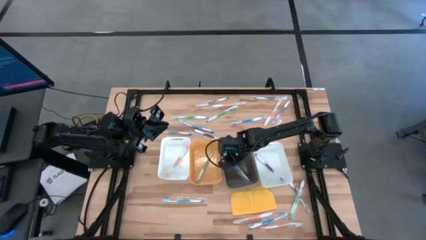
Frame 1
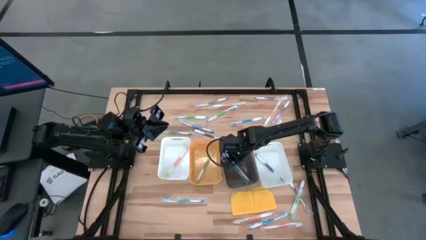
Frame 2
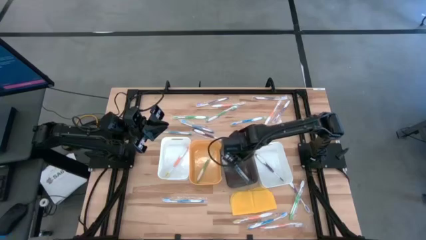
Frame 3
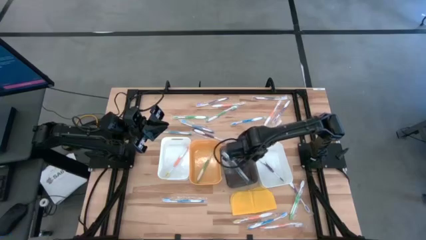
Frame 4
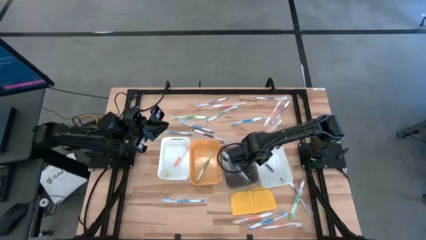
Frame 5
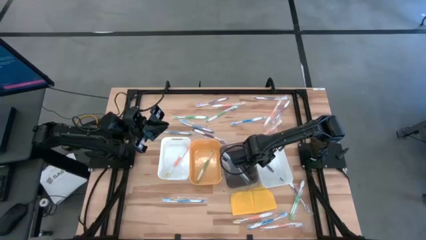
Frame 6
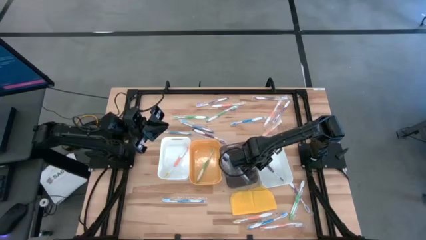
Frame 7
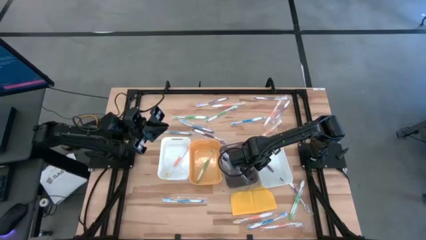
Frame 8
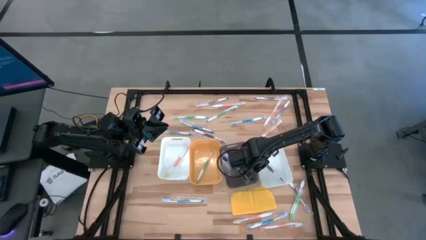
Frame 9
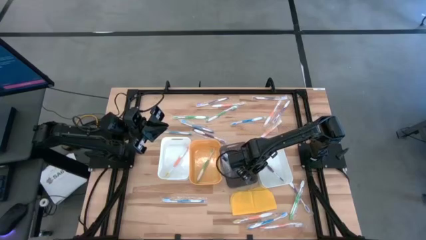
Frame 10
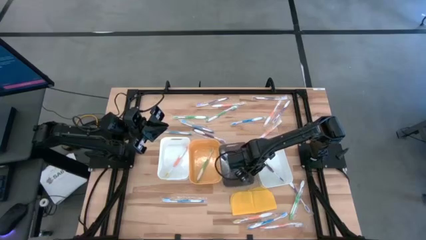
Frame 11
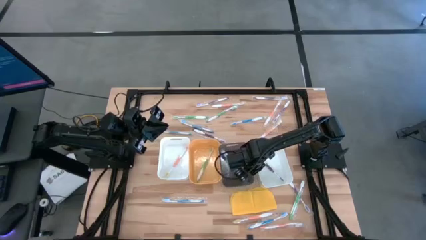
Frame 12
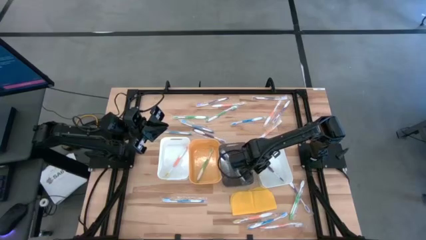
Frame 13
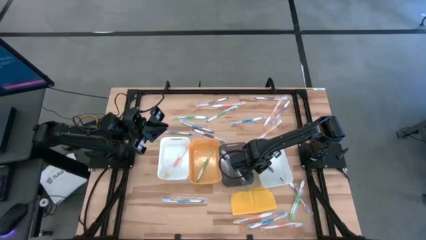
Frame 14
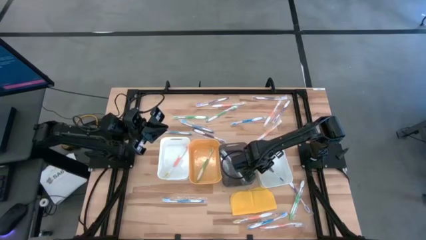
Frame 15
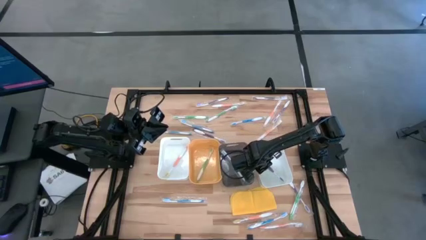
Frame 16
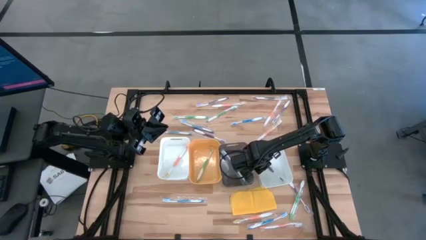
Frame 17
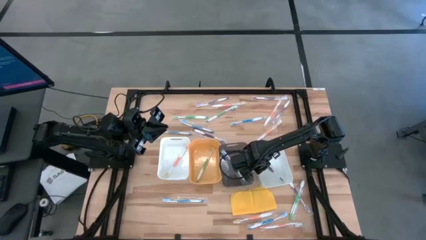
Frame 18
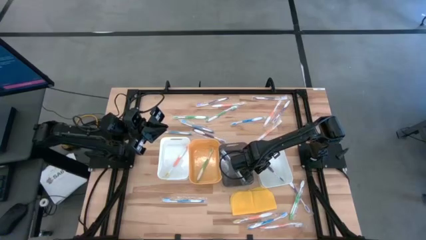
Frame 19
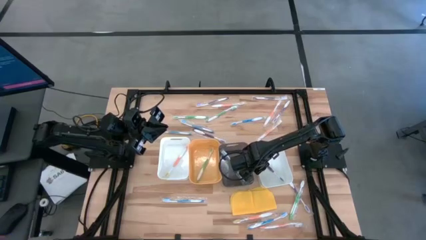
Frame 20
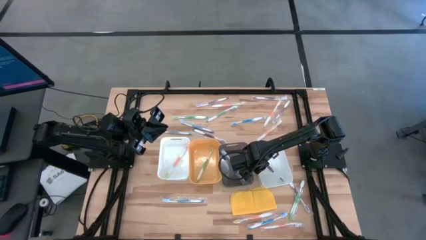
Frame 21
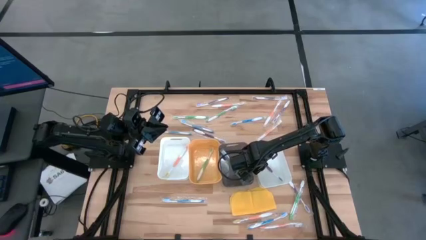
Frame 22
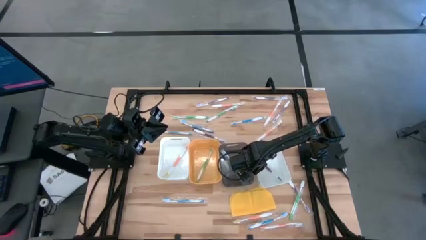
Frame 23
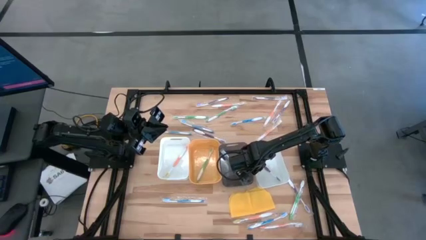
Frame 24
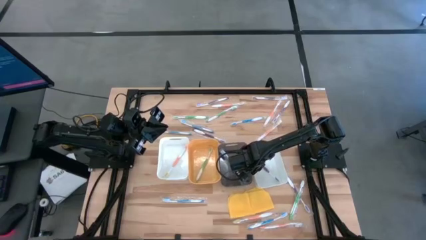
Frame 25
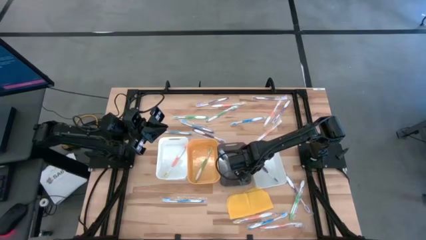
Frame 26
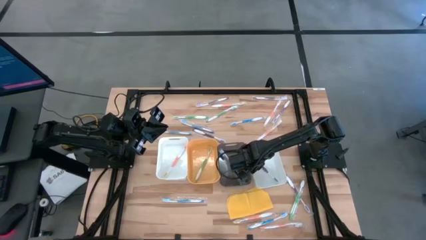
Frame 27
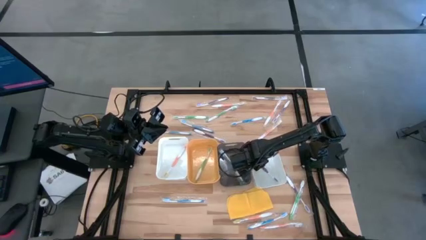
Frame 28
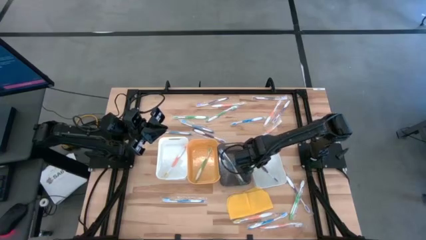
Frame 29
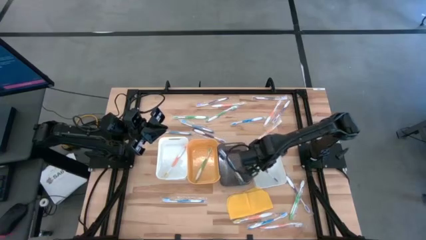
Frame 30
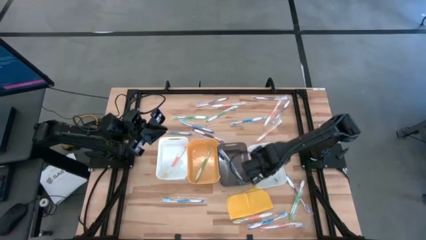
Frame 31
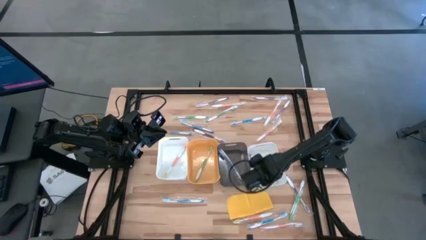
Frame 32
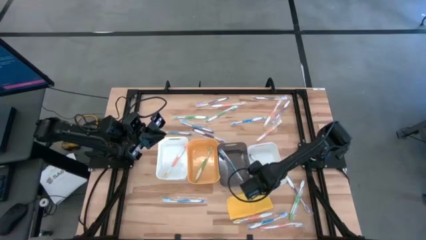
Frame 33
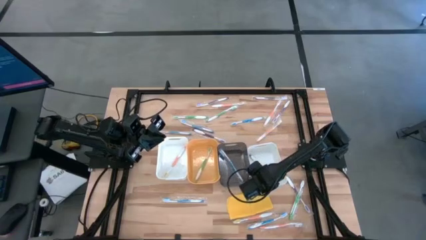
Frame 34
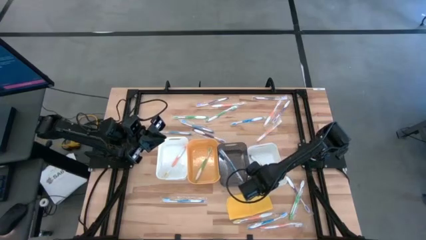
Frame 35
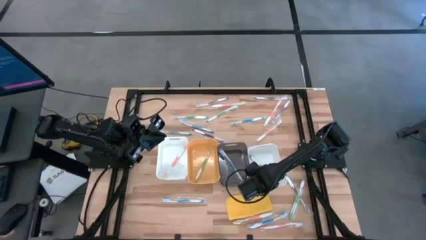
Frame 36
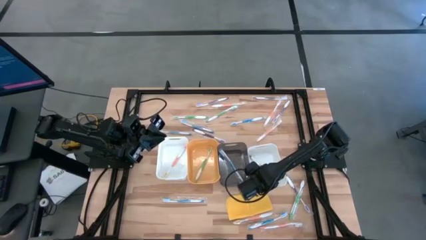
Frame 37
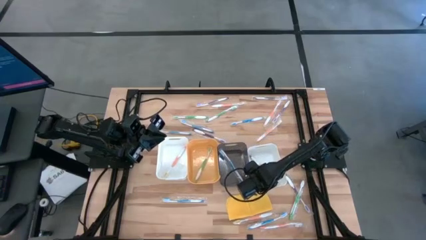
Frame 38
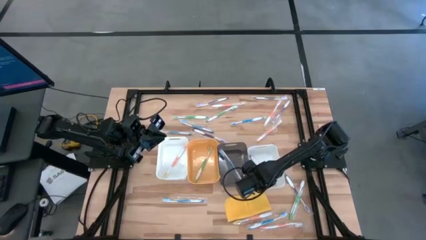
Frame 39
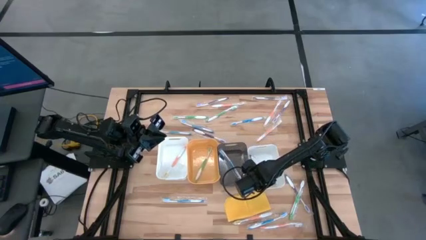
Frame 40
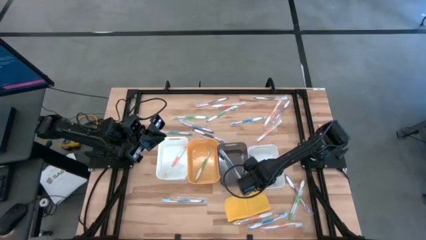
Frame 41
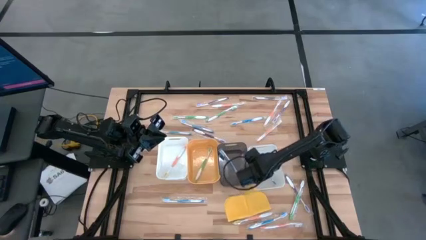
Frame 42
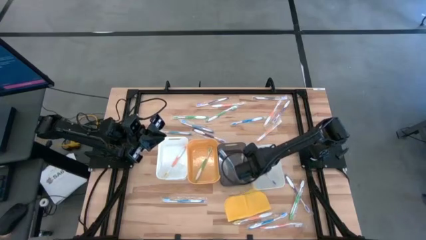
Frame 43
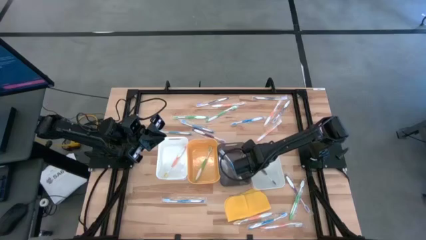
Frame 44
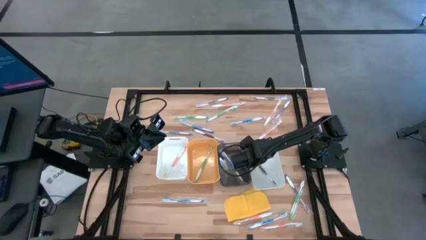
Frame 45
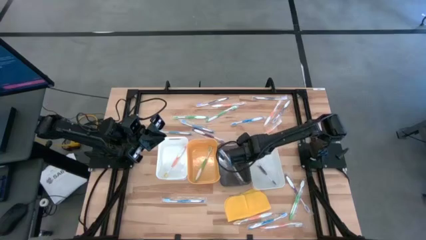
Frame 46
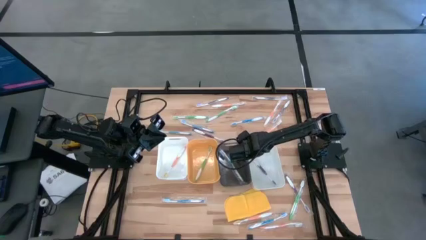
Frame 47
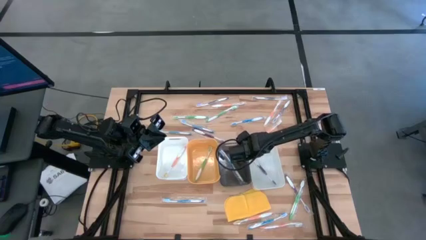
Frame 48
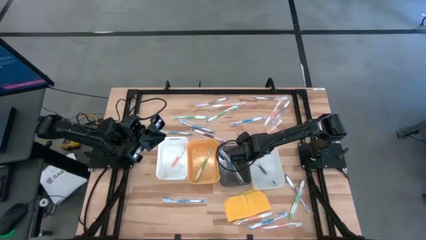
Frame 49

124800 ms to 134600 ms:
Task: Pick & Place Toothbrushes
Adjust the bins

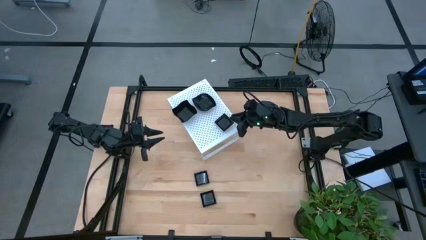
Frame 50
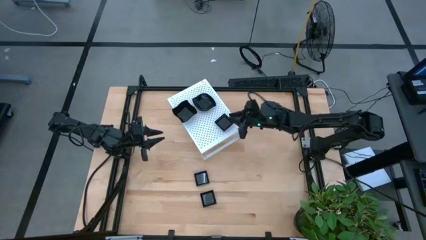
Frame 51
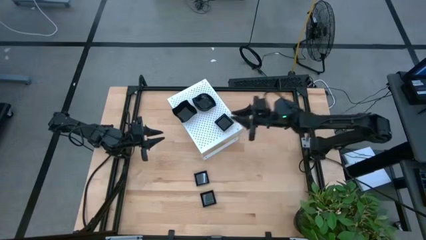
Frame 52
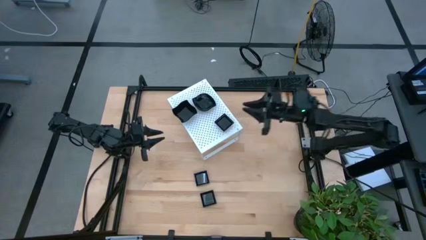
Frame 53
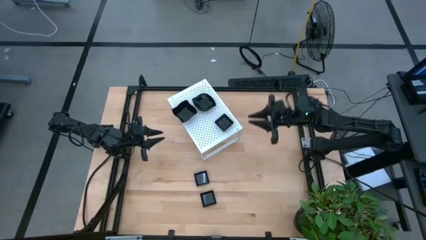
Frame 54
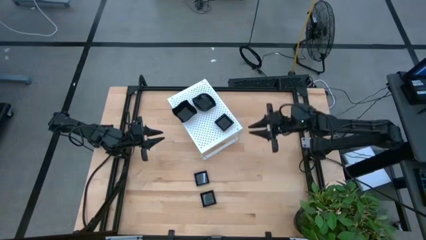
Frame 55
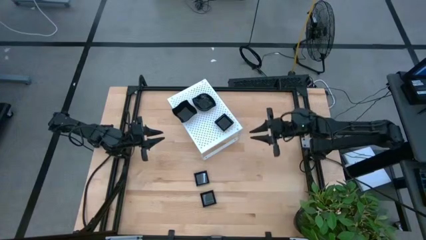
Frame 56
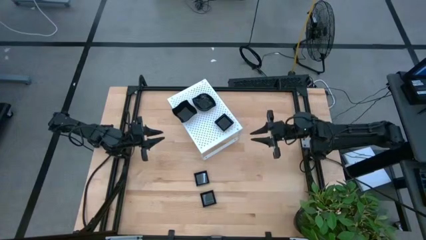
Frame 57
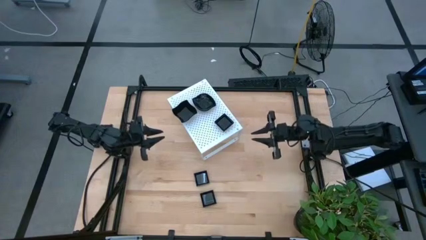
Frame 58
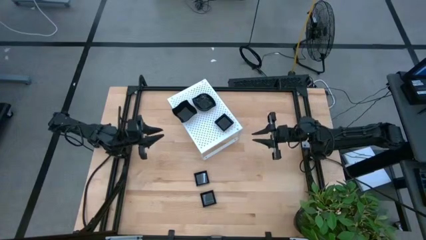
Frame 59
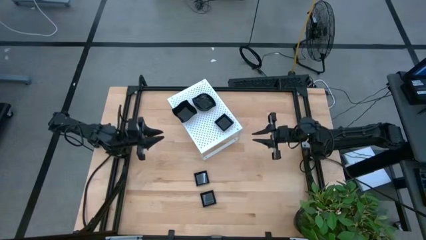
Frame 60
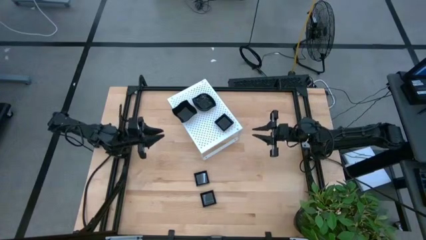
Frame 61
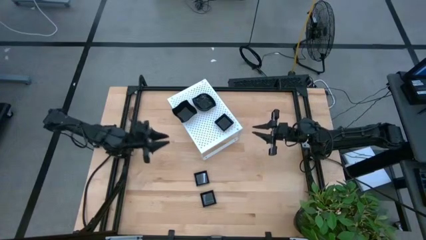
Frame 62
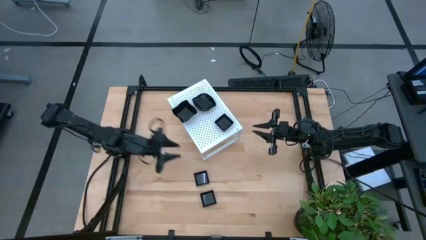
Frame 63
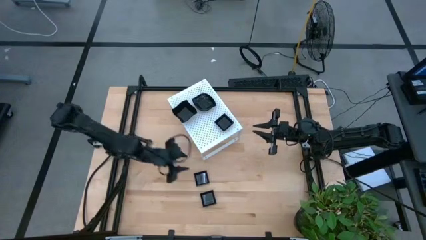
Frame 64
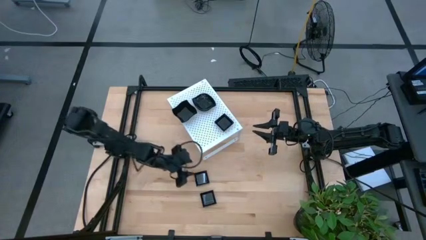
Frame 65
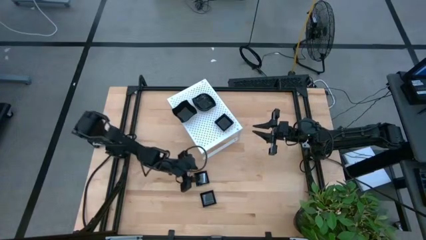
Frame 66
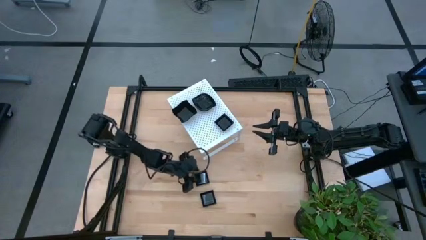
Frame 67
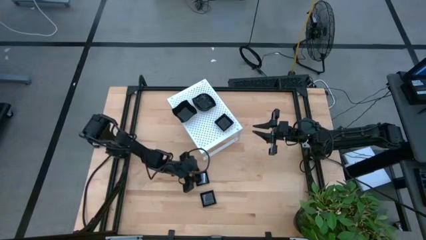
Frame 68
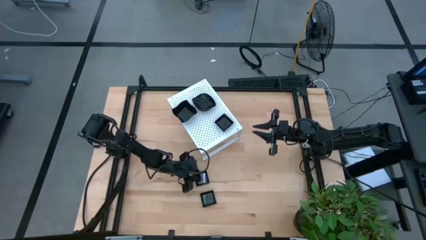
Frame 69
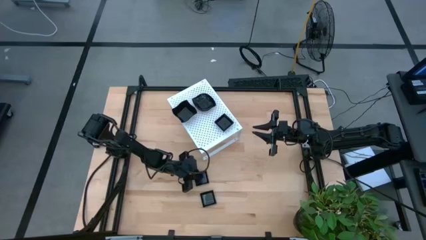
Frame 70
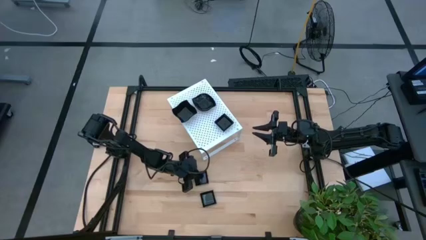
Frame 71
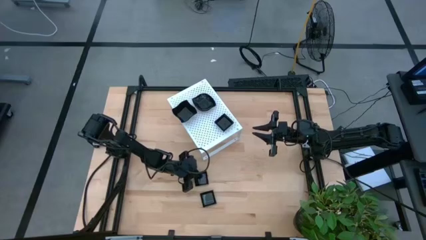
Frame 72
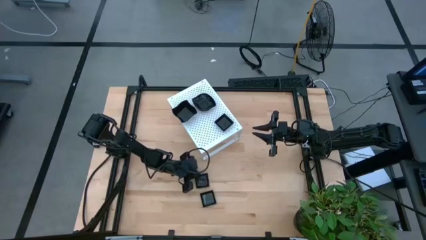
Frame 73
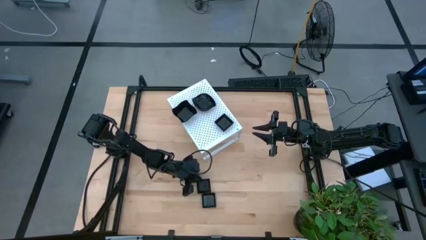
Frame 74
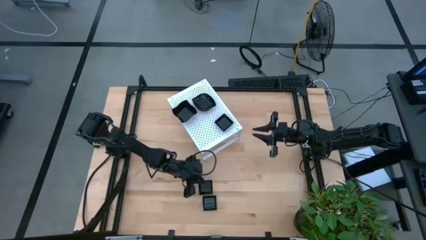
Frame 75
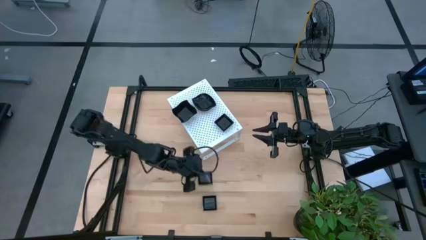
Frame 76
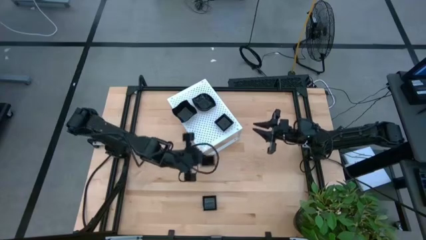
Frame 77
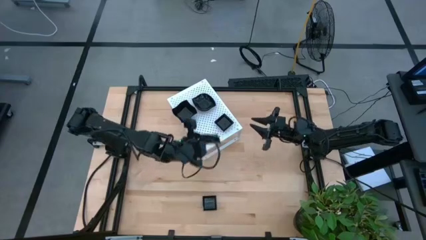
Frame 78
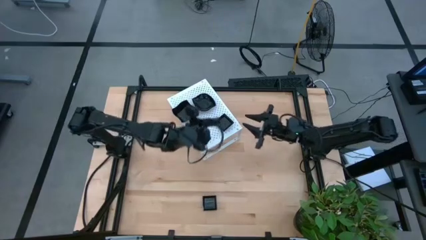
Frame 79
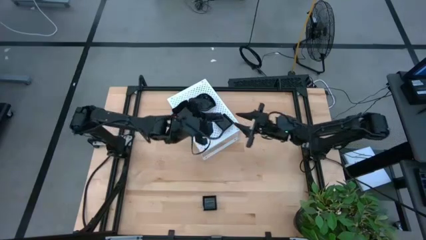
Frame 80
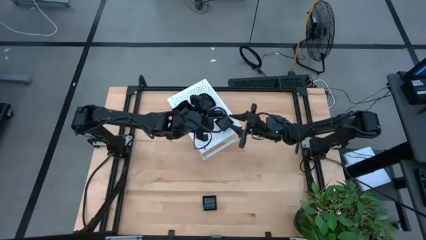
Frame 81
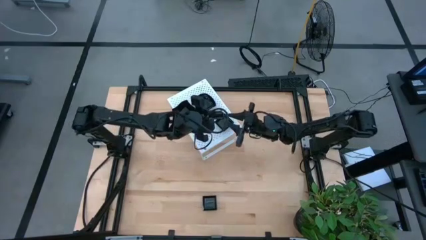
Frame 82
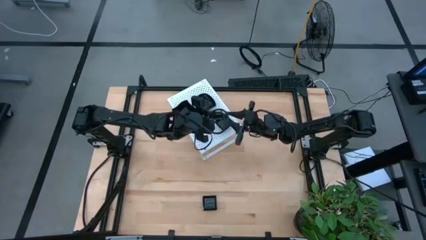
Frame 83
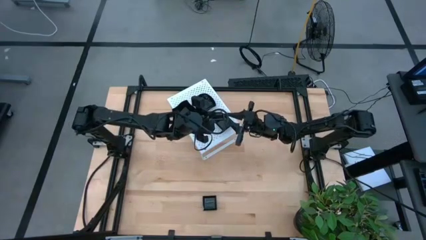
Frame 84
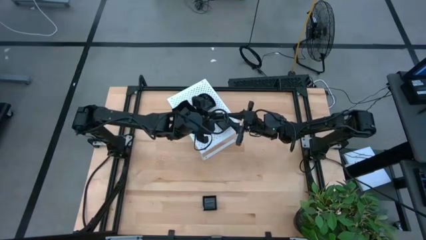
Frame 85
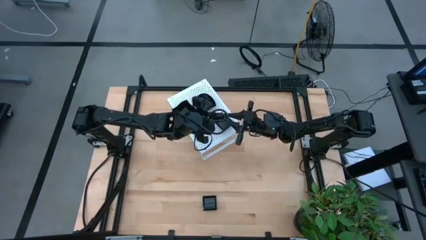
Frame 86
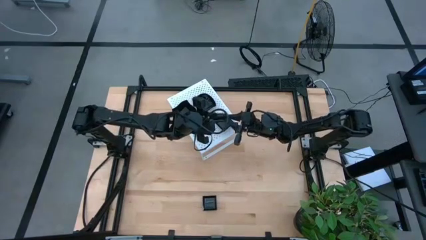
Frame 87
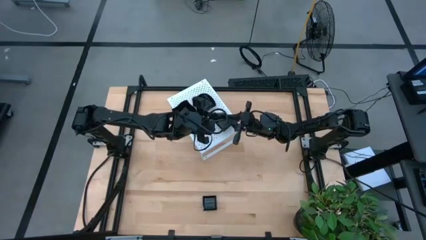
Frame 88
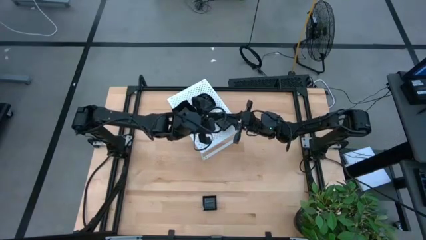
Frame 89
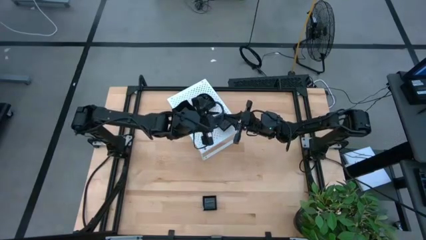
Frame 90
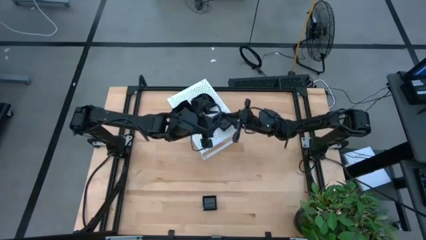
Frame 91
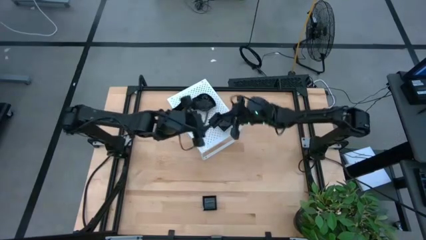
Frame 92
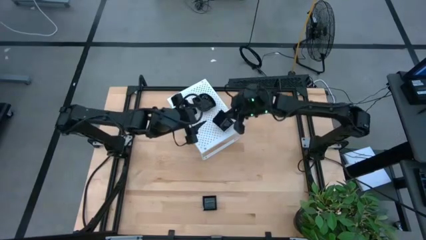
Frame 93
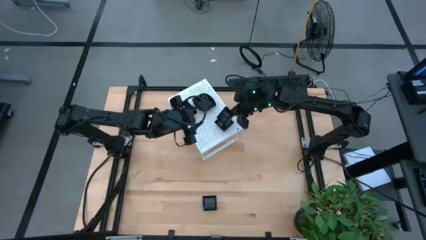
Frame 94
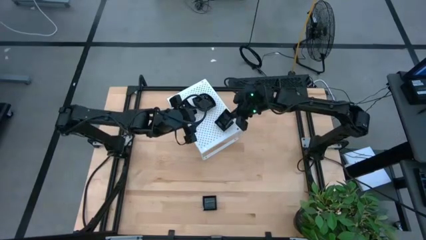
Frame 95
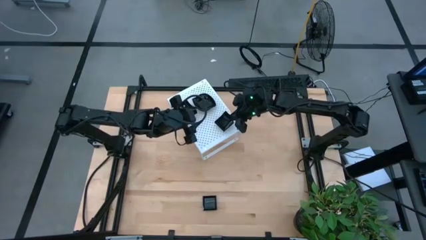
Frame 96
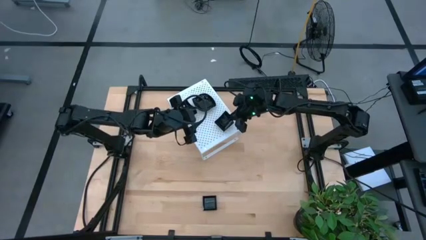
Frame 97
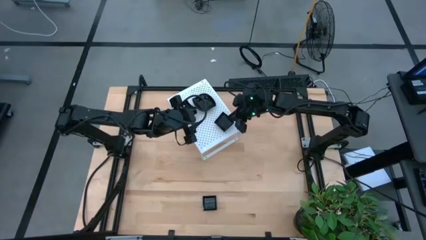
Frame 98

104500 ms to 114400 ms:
Task: Pick & Place Mini shaped plates
Stack the square plate on top of the stacked square plates on the shelf
